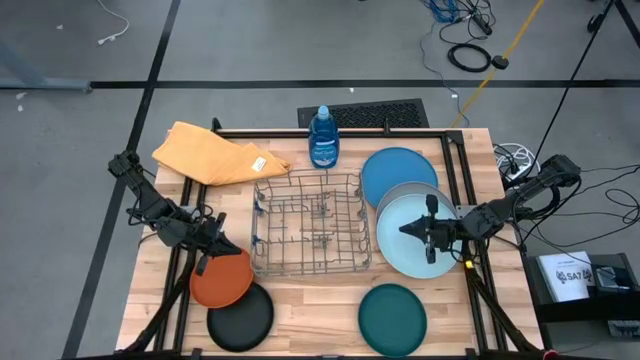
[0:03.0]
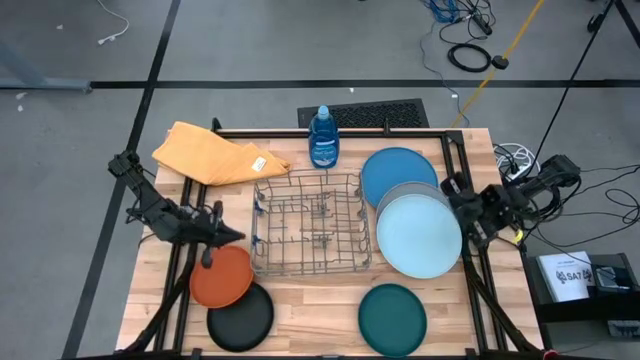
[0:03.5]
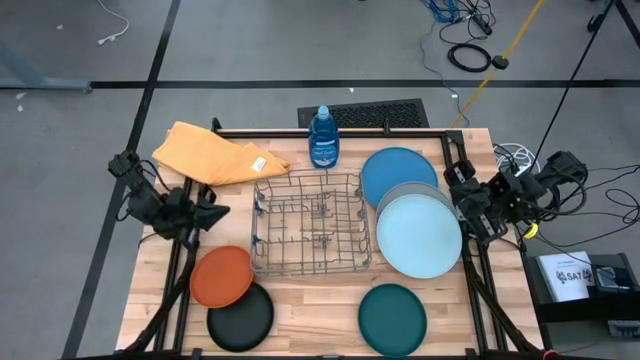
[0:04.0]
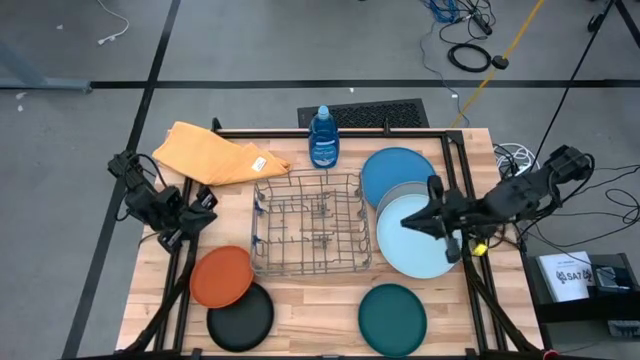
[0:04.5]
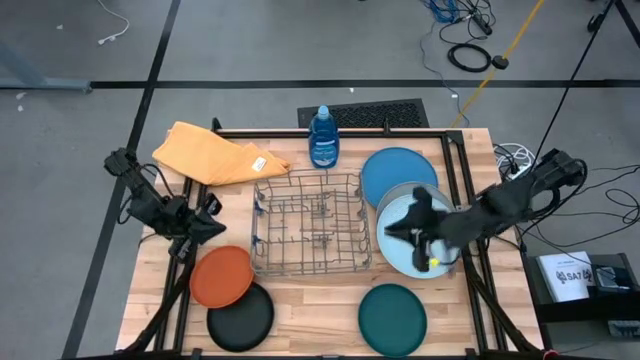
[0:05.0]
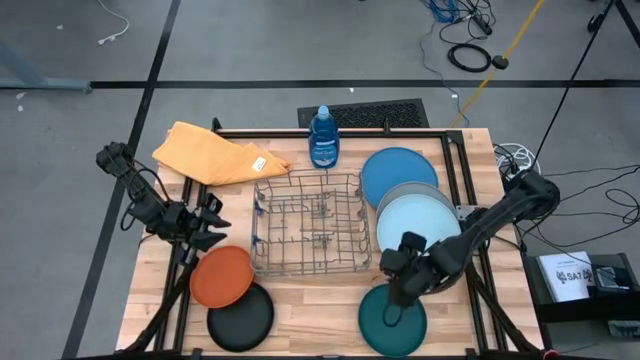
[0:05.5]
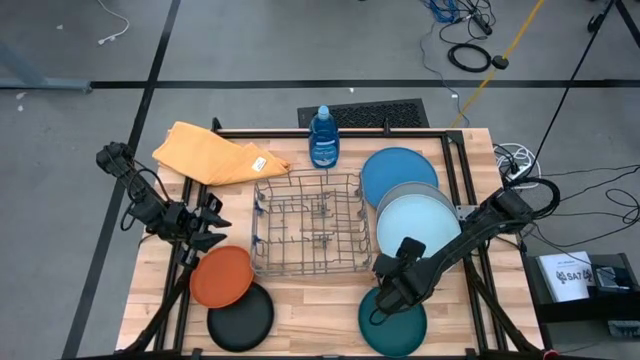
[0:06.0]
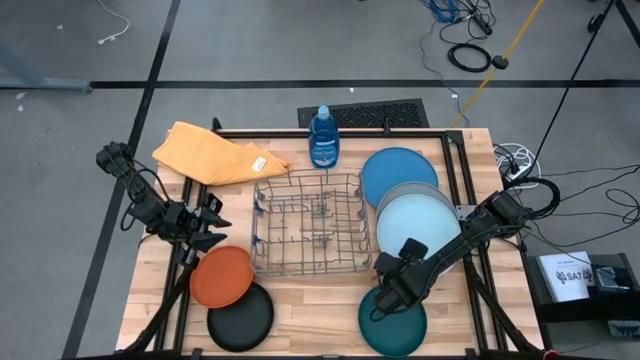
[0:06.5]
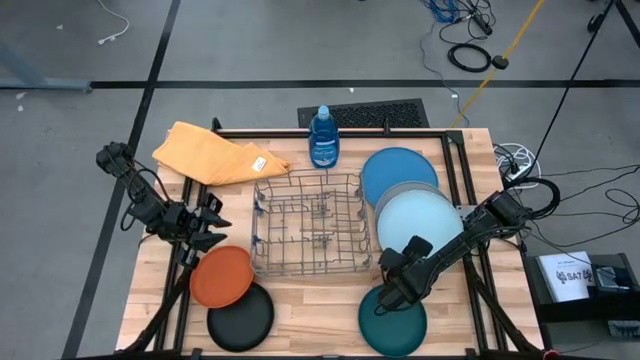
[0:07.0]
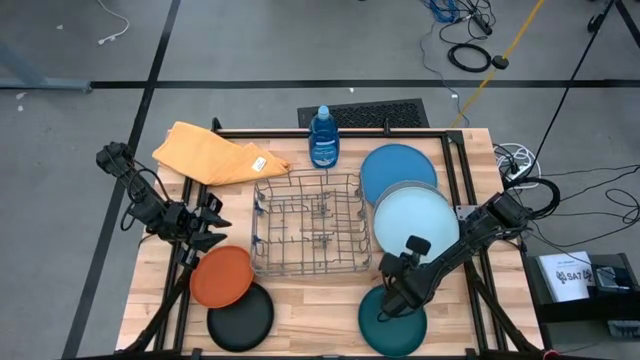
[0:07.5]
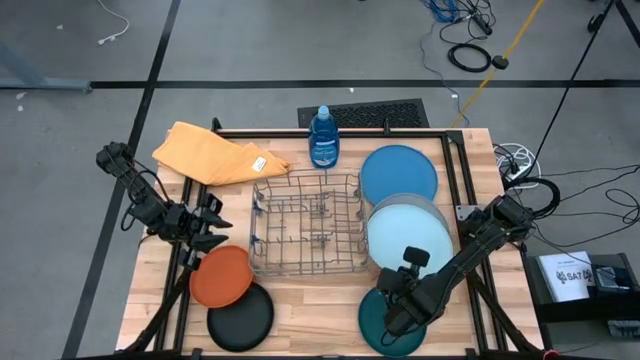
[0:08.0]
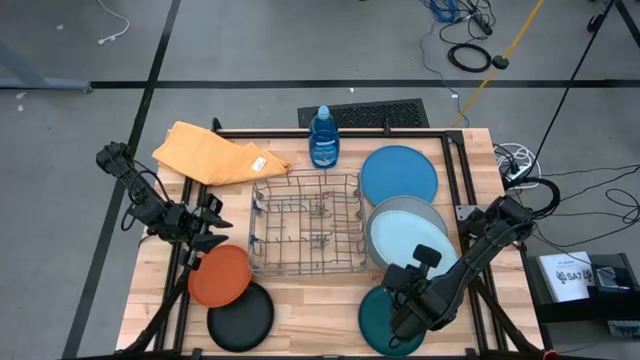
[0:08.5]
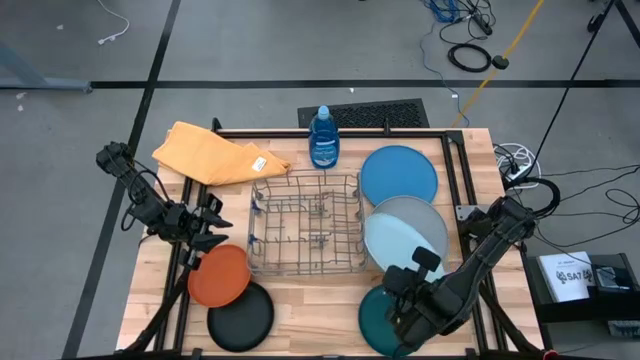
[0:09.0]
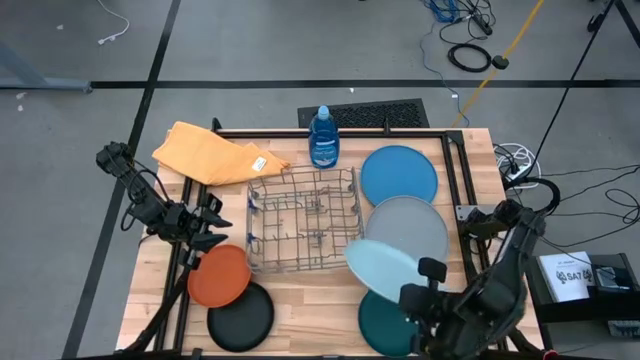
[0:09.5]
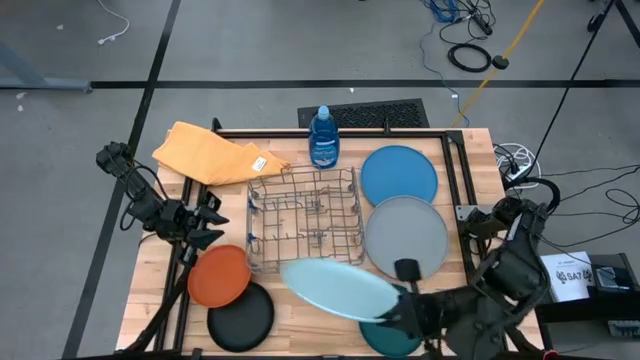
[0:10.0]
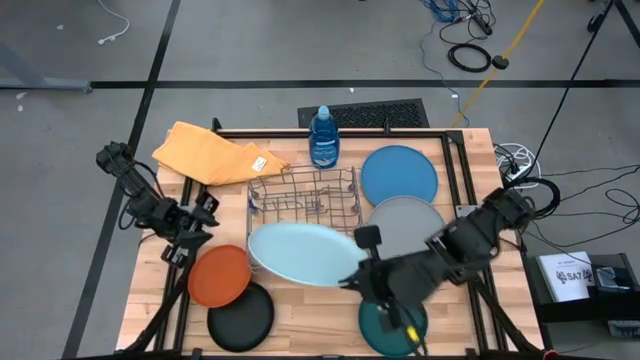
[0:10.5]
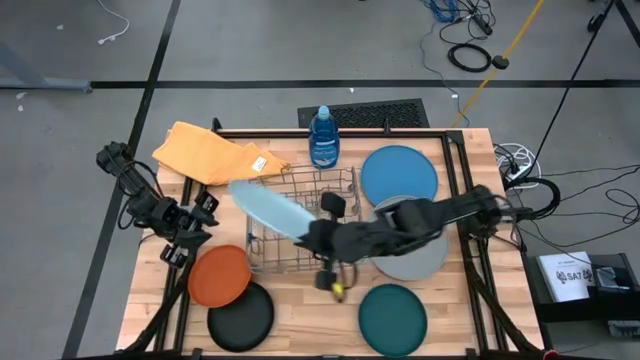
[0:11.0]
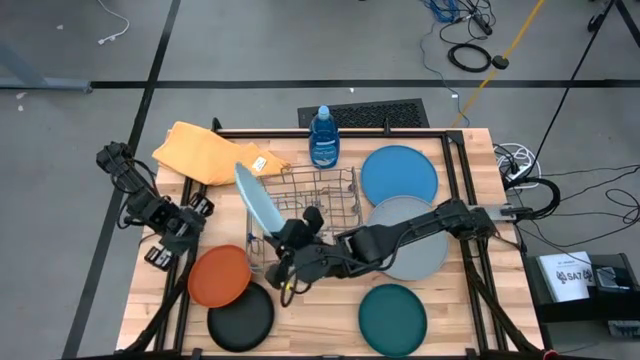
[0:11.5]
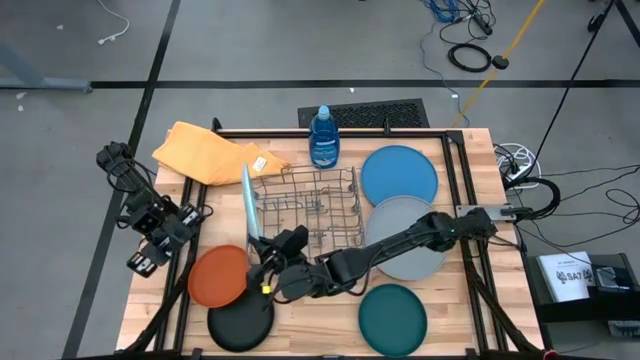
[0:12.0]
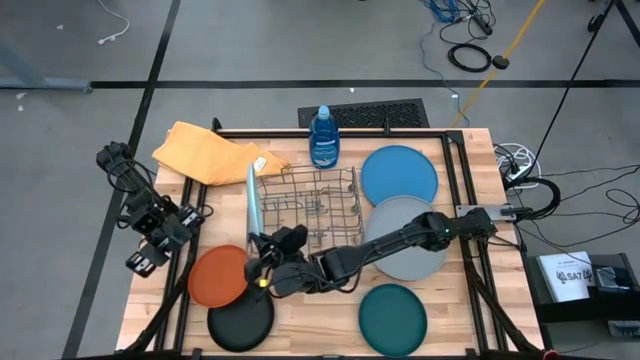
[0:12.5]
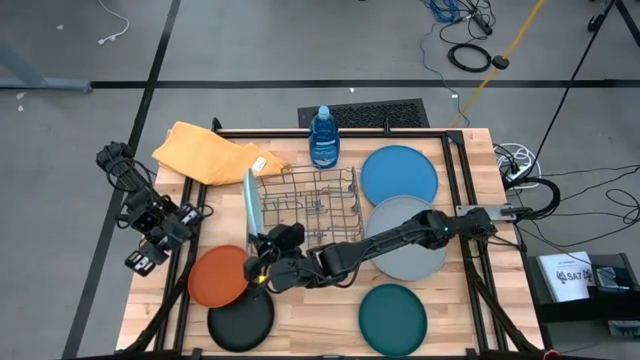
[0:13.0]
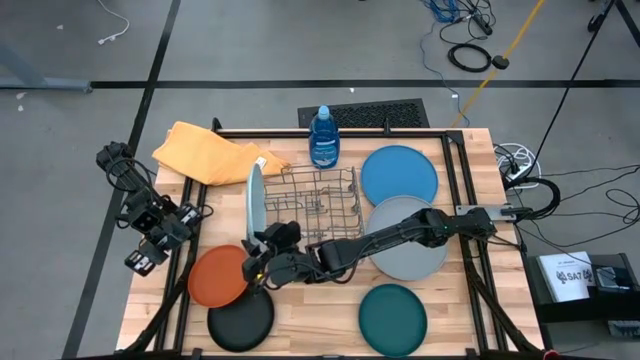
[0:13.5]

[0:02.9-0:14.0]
Task: Sort dishes
Put the light blue plate in the dish rack

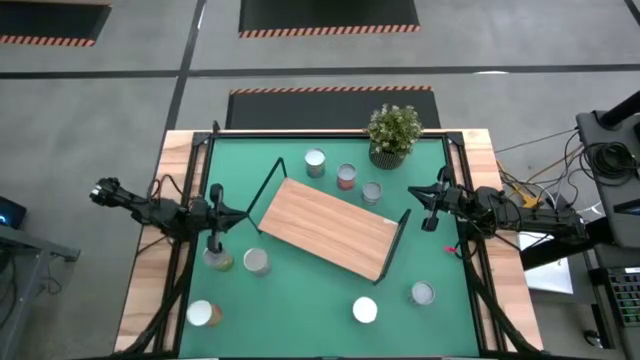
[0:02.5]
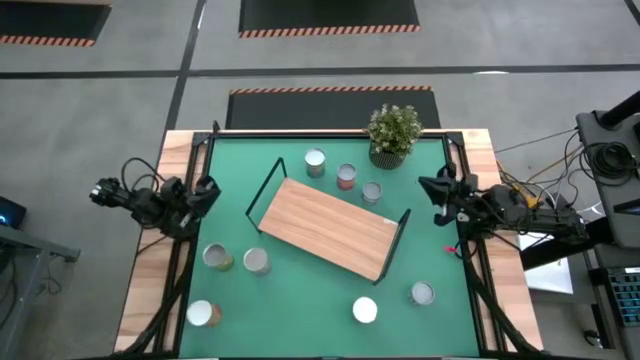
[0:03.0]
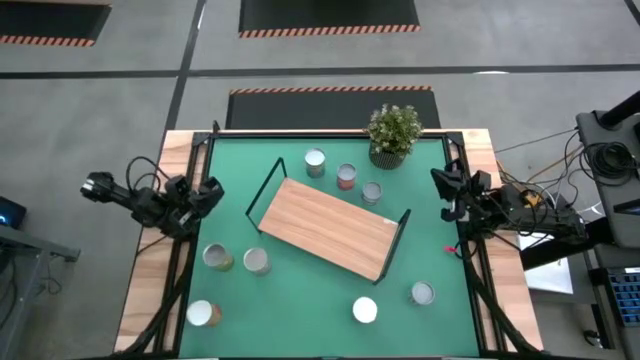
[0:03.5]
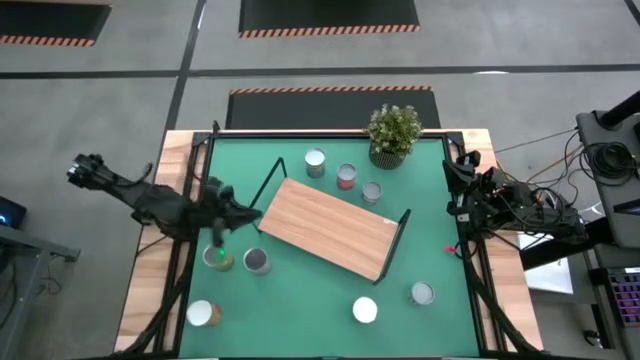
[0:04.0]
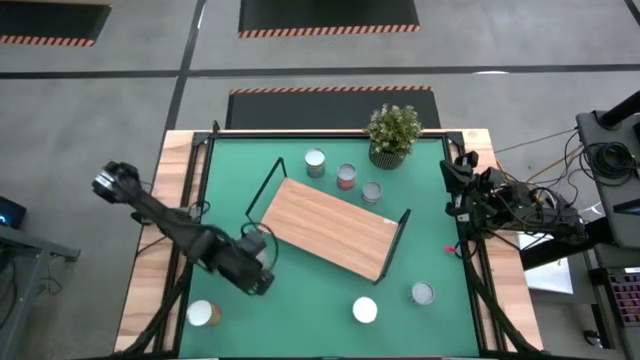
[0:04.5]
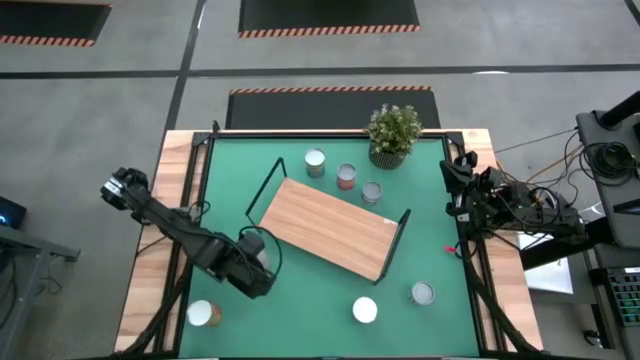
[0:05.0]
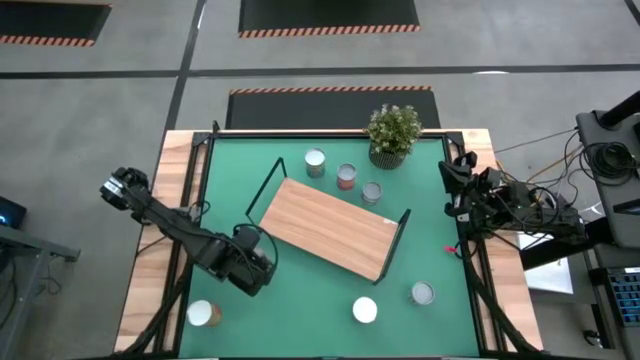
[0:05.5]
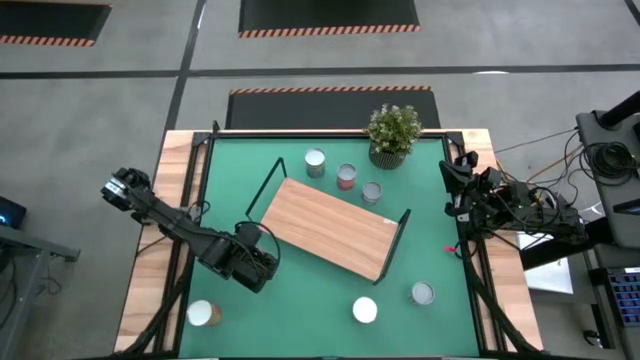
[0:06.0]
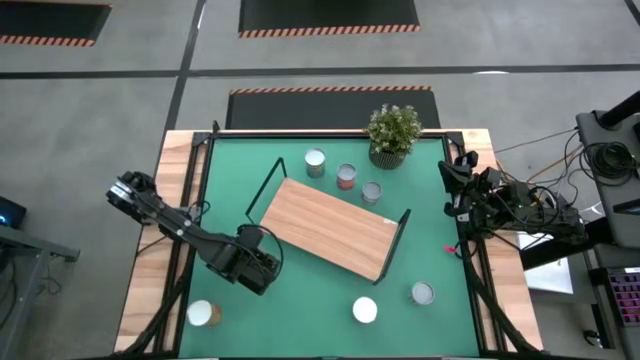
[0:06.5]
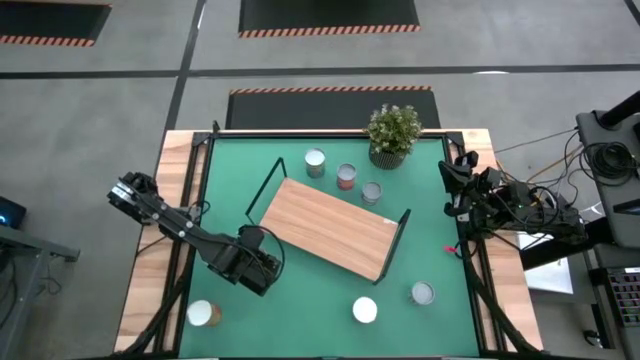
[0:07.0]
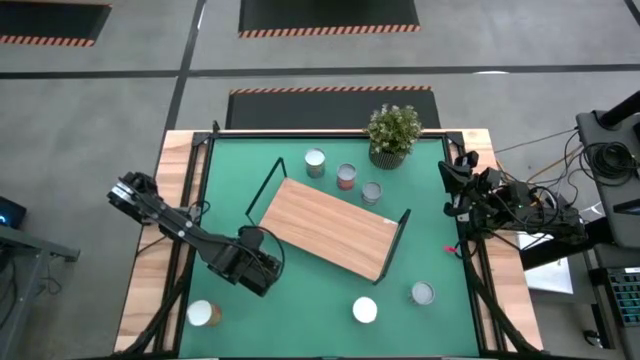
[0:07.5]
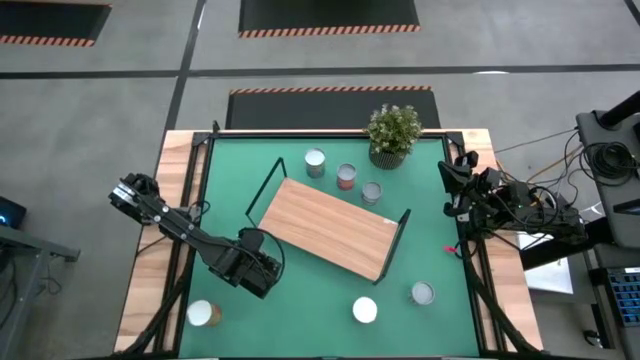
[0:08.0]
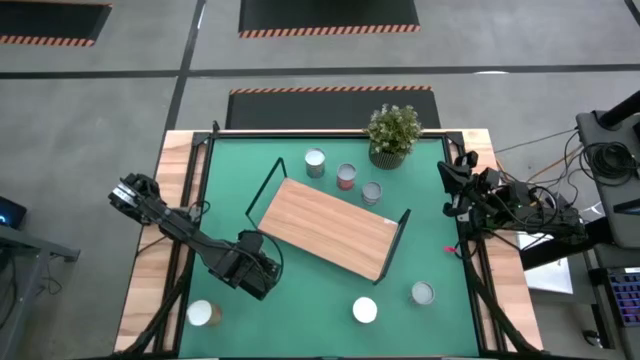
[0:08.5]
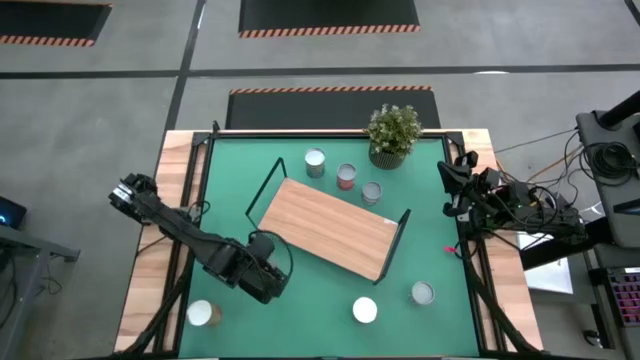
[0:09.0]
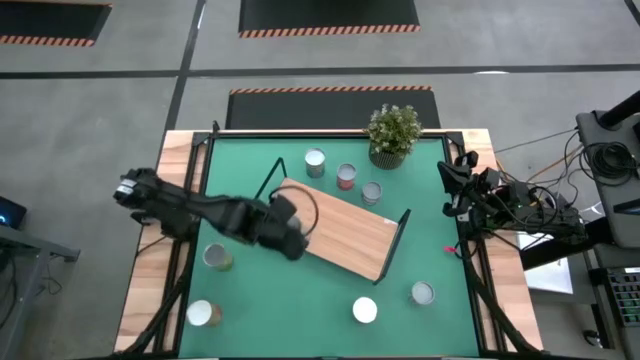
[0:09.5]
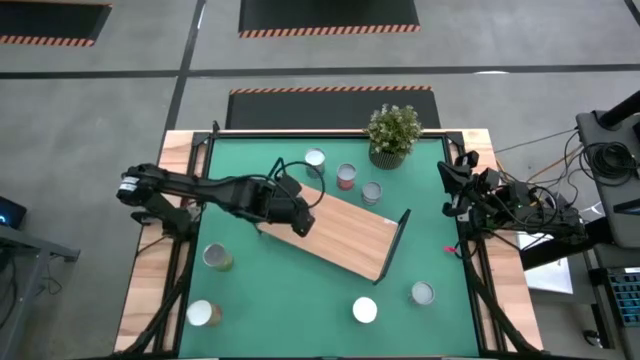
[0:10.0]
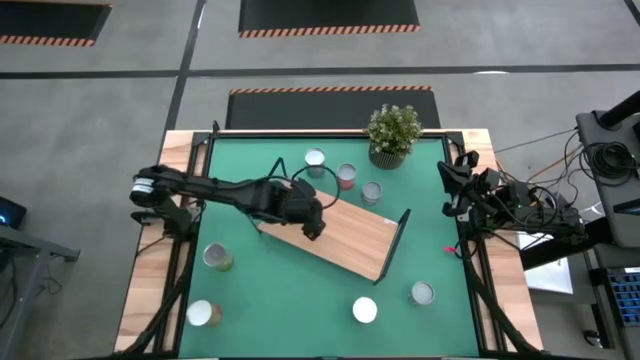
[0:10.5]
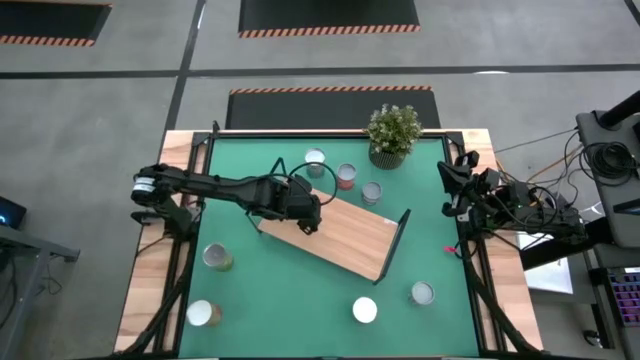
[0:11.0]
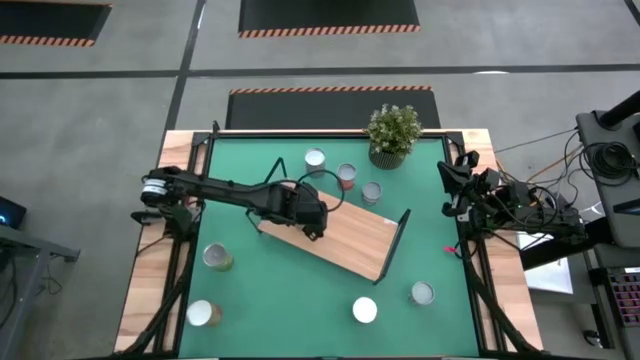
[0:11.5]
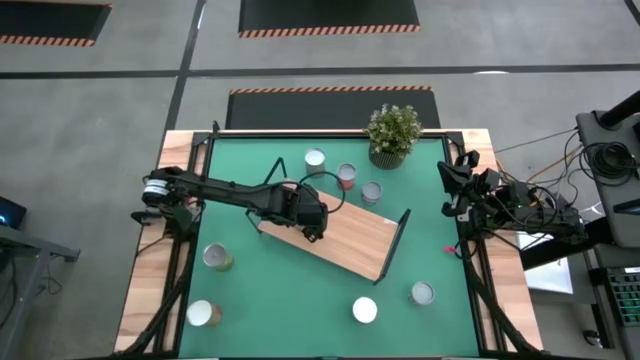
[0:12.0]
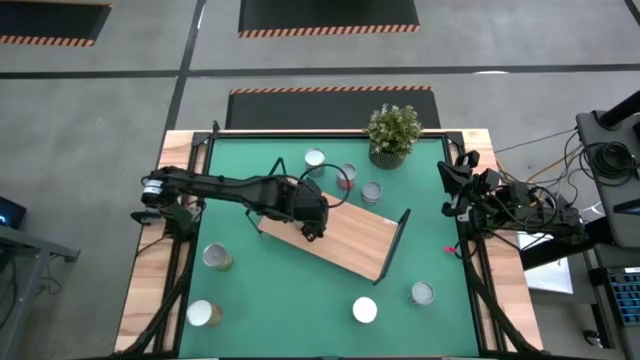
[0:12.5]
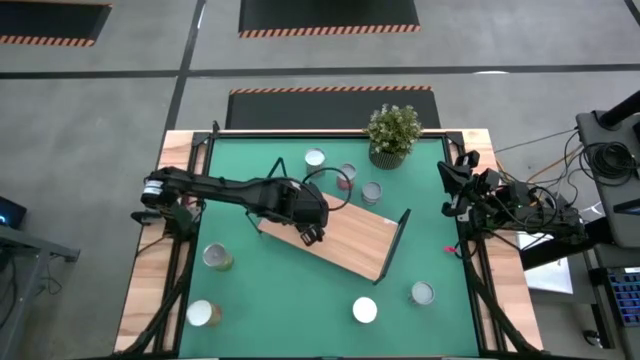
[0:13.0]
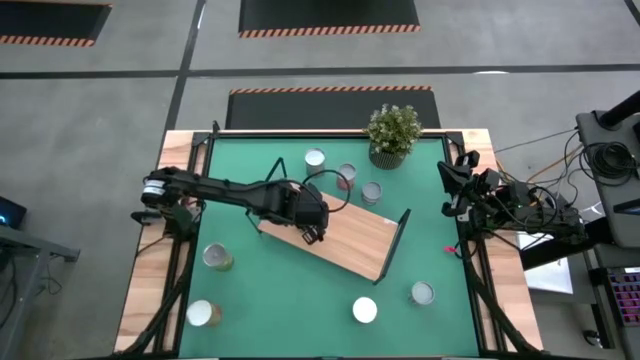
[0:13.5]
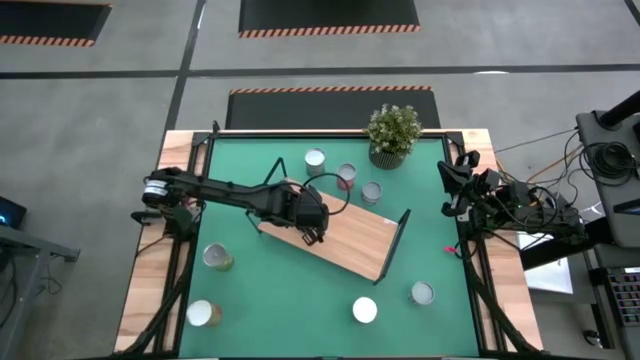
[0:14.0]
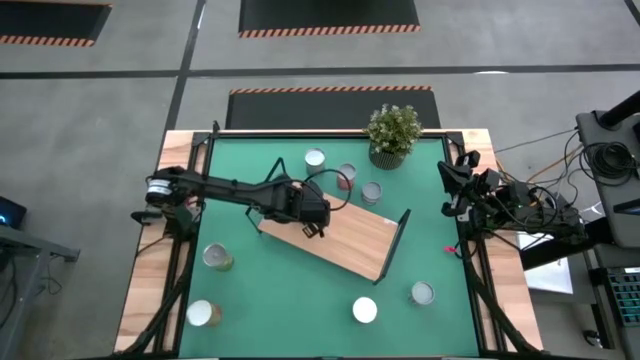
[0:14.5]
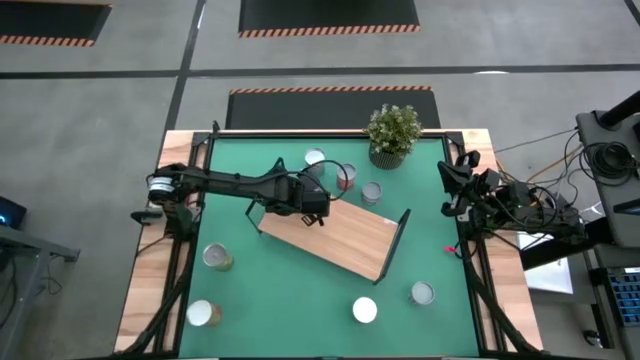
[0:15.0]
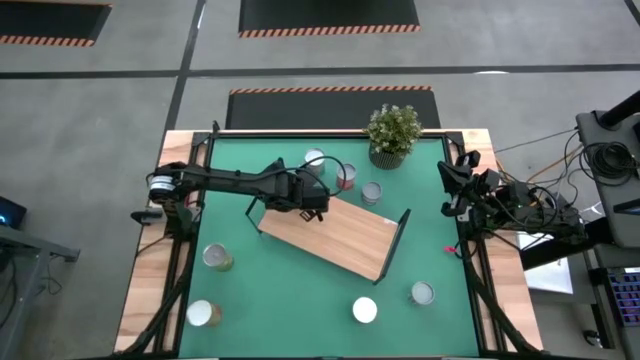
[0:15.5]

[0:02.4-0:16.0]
Task: Pick and place cans onto a shelf
Put the canned peaches on the shelf
